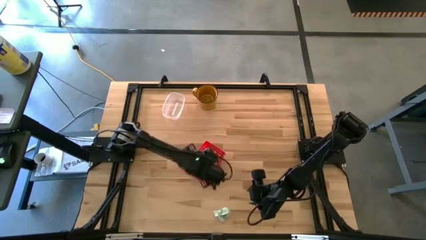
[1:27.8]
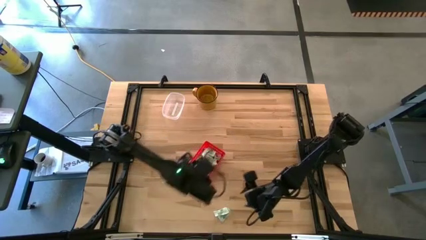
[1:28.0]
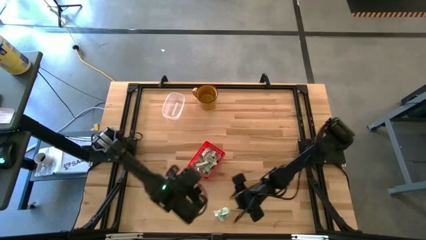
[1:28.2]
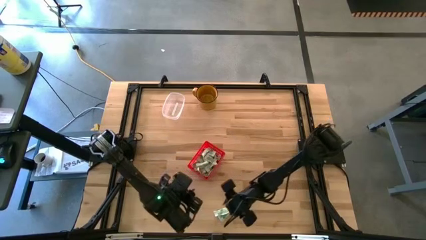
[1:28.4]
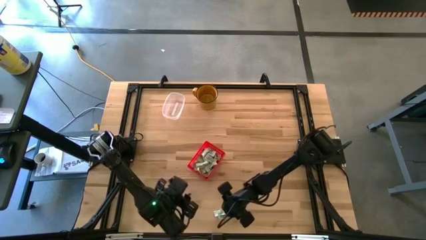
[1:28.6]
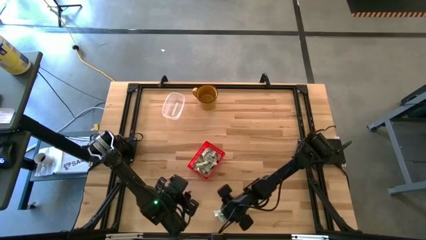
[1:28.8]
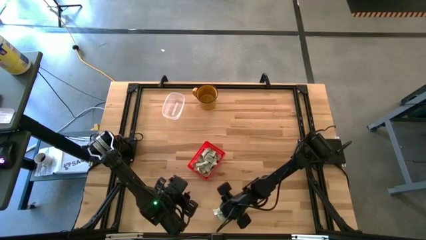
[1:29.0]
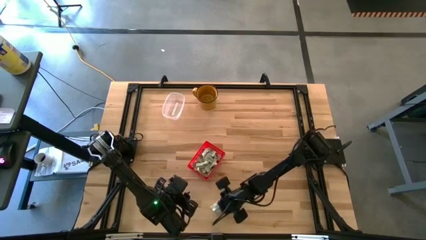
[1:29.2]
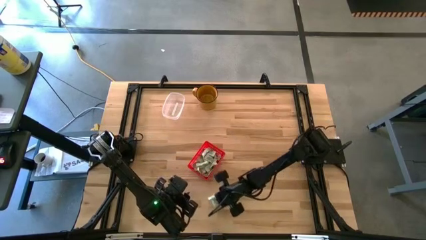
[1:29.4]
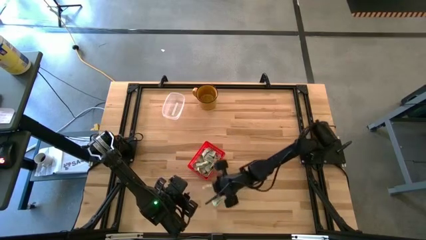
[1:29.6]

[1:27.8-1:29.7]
Task: Pick and place Stevia / Truvia into bins
Put the white stevia packet into the red basket

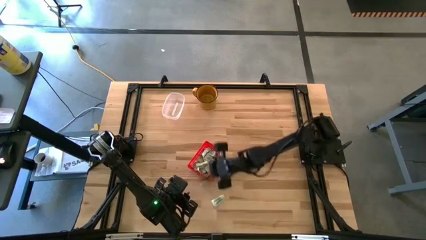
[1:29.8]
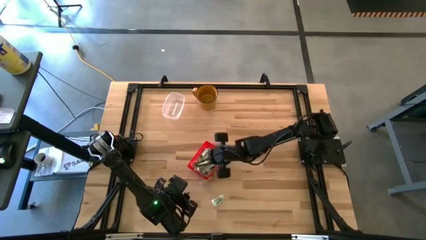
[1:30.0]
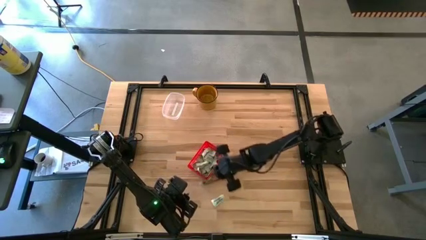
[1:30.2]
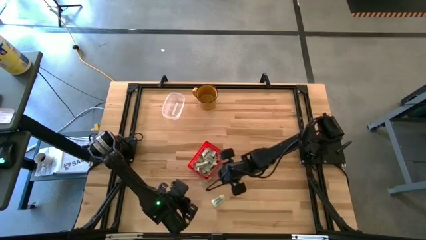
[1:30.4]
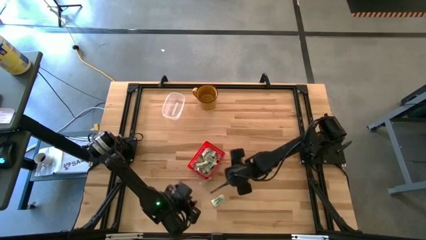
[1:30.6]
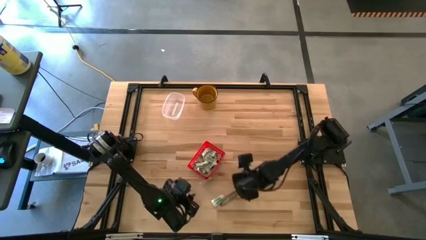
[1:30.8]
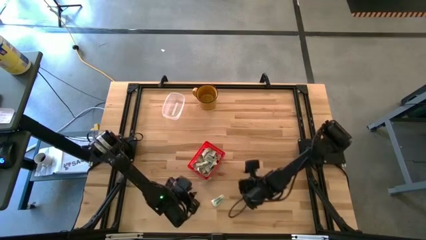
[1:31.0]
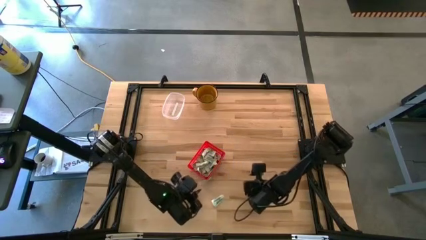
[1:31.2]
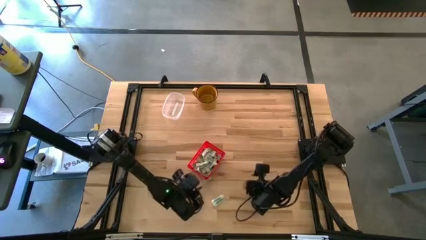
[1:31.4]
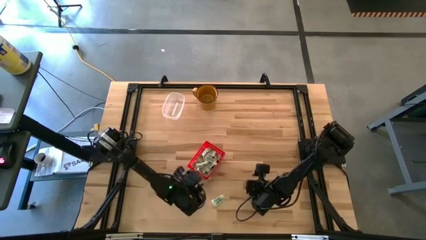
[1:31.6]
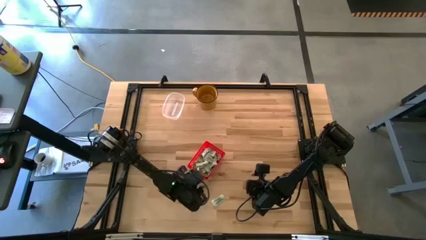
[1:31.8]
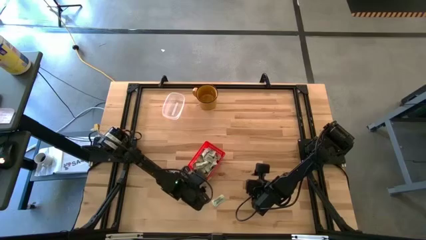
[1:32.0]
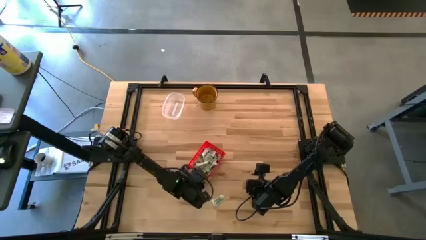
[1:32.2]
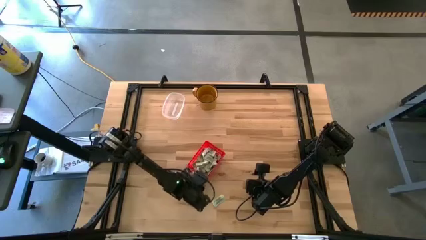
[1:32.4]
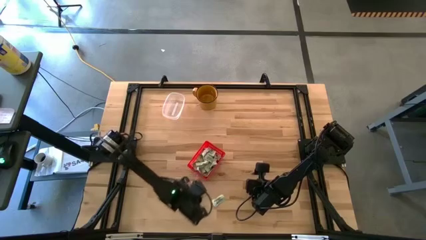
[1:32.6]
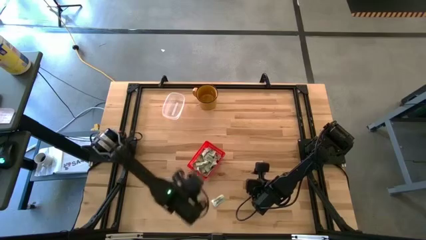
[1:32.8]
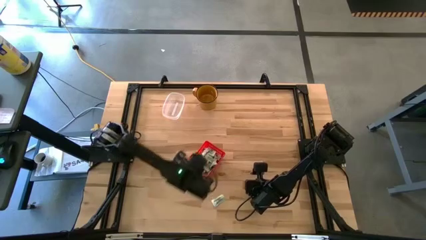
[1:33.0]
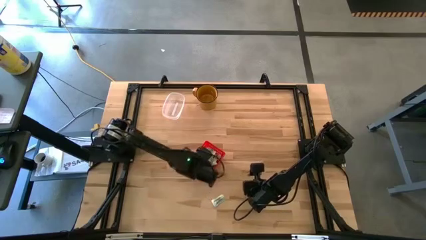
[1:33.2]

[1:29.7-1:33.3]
Put the white stevia packet into the red basket

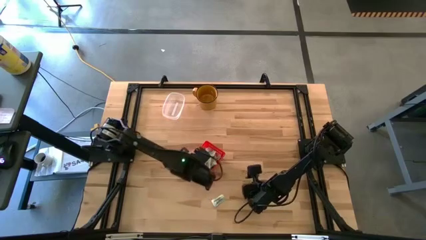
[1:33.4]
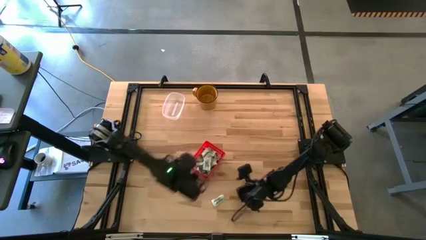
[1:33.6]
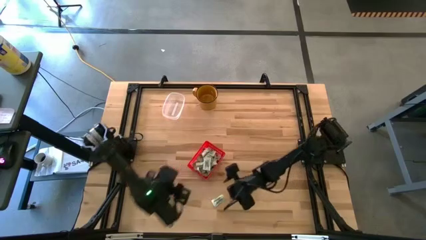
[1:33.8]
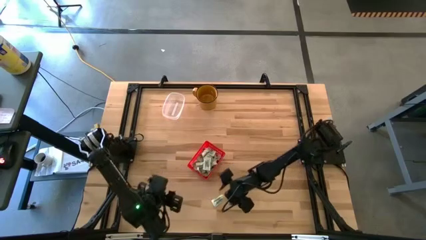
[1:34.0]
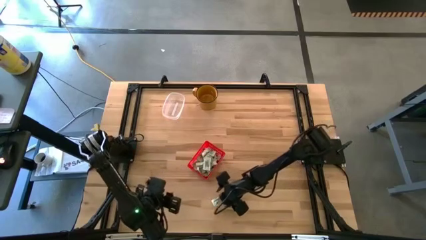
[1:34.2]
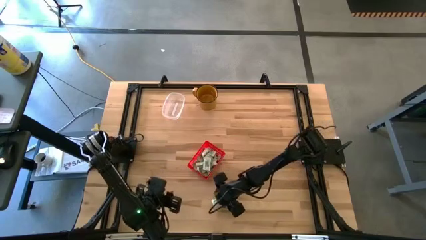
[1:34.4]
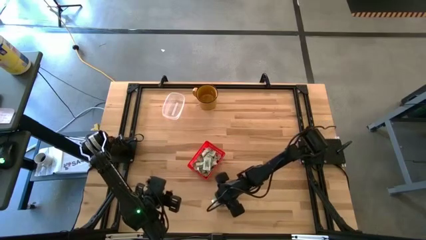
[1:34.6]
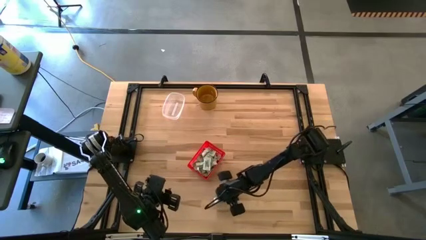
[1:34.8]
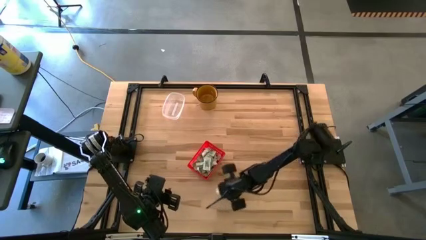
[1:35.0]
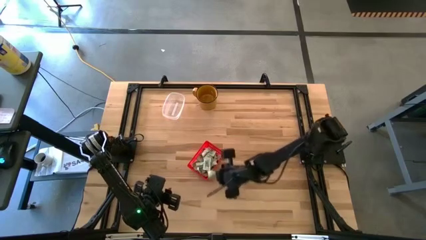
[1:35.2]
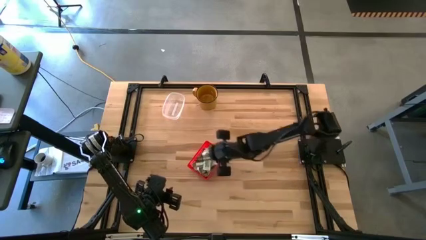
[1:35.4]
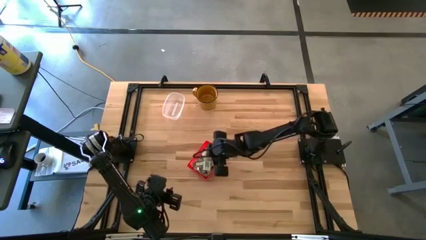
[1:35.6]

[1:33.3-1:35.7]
Put the white stevia packet into the red basket

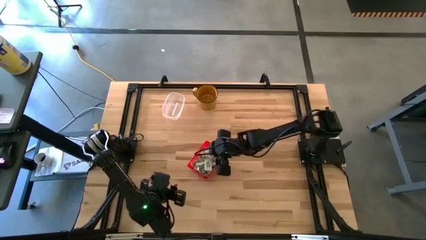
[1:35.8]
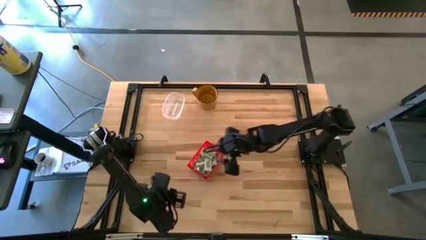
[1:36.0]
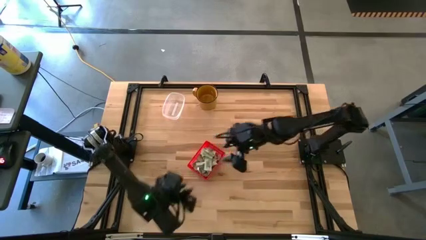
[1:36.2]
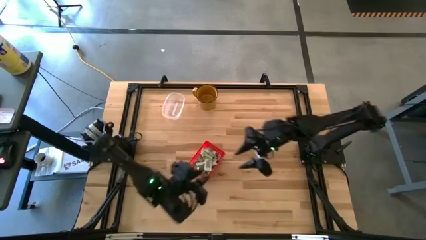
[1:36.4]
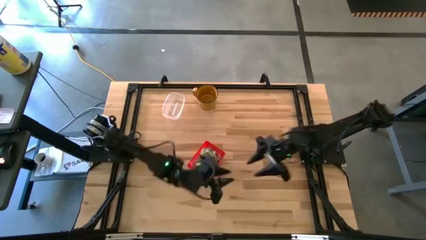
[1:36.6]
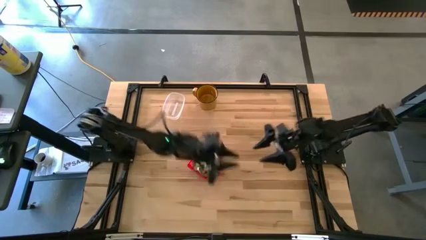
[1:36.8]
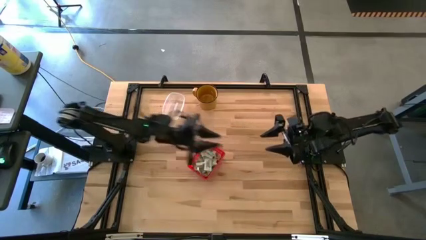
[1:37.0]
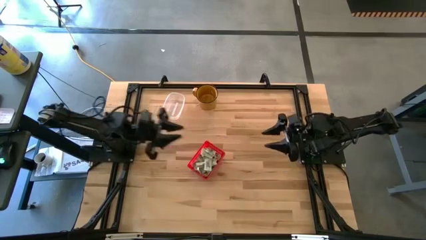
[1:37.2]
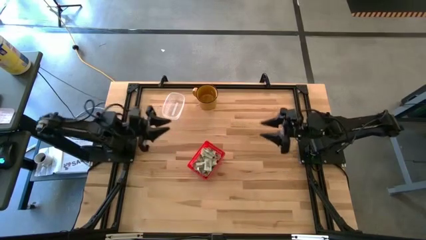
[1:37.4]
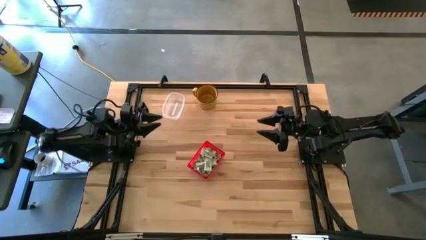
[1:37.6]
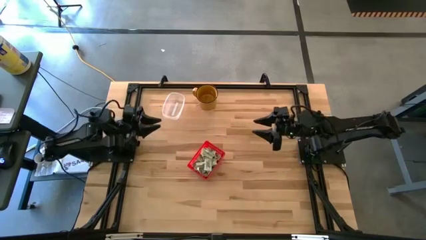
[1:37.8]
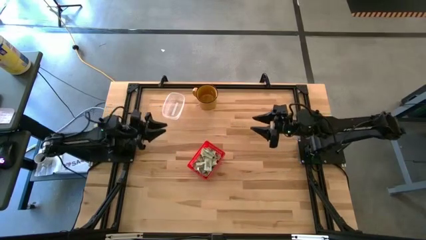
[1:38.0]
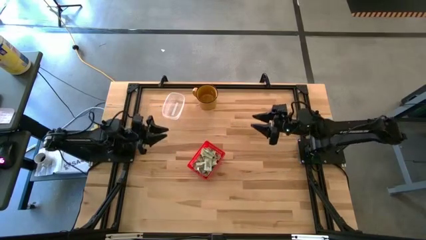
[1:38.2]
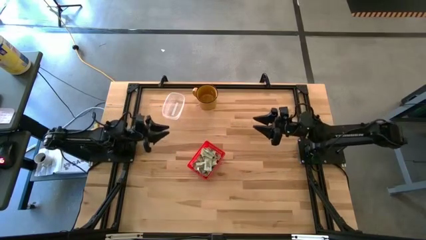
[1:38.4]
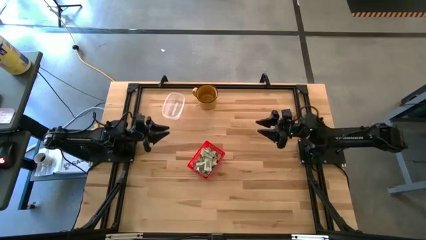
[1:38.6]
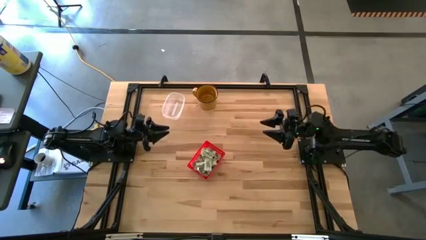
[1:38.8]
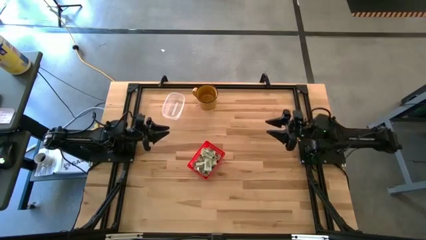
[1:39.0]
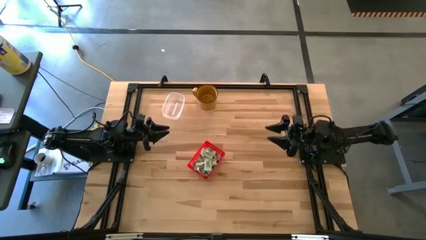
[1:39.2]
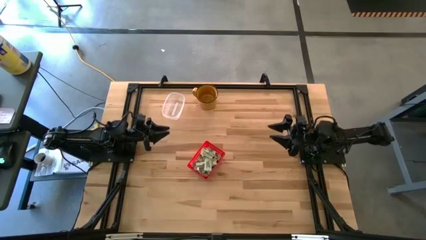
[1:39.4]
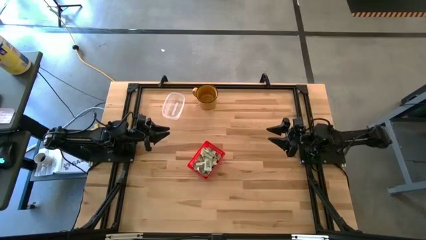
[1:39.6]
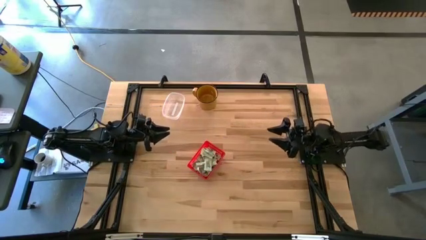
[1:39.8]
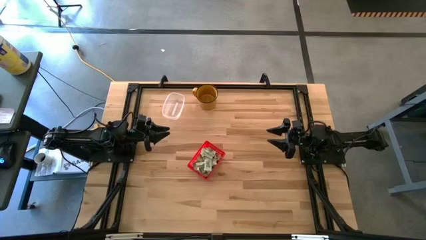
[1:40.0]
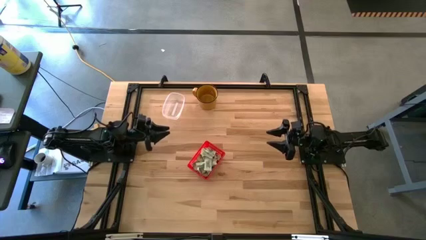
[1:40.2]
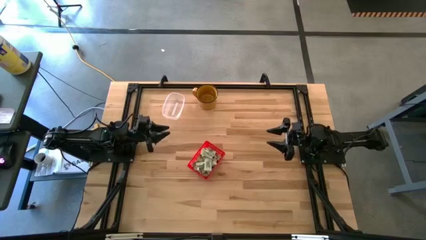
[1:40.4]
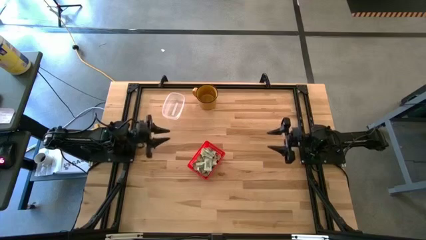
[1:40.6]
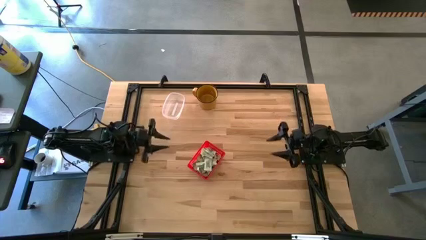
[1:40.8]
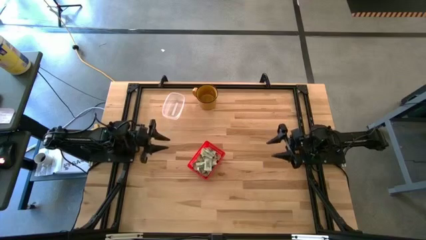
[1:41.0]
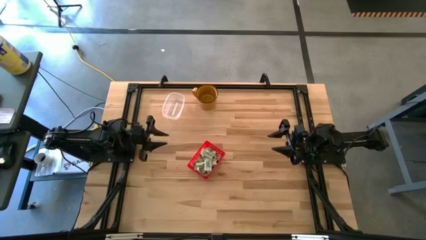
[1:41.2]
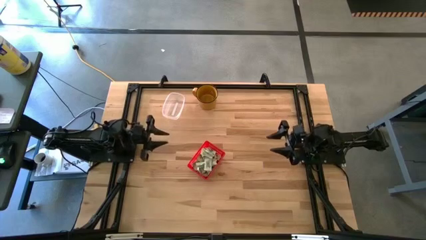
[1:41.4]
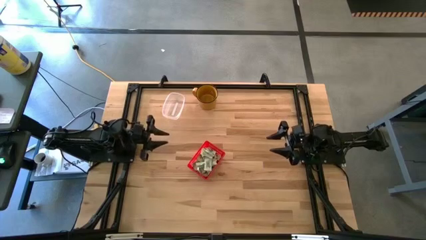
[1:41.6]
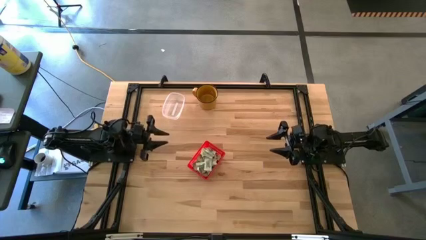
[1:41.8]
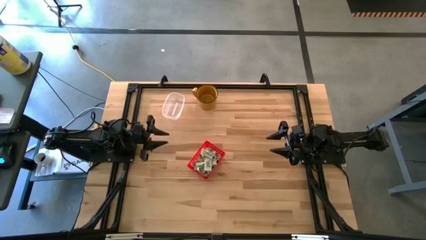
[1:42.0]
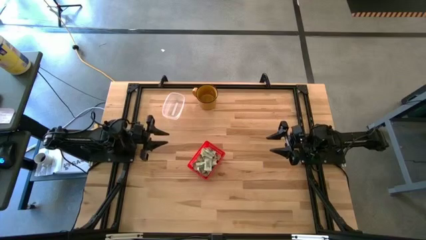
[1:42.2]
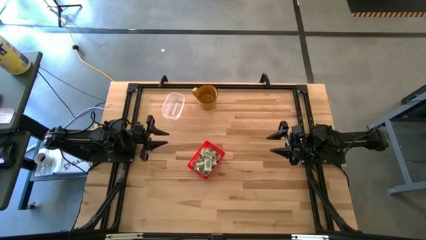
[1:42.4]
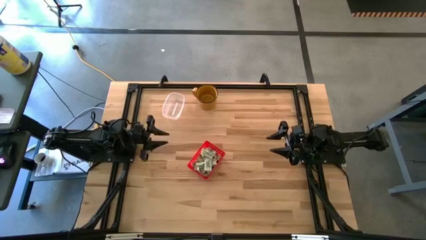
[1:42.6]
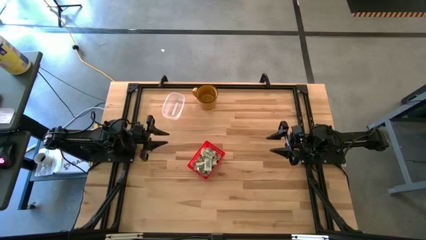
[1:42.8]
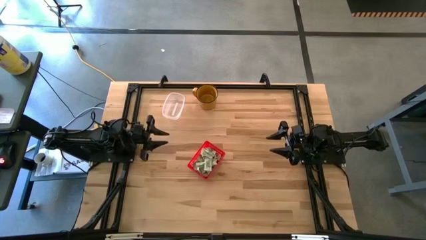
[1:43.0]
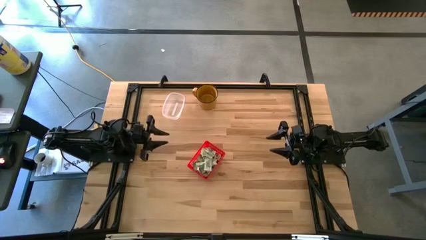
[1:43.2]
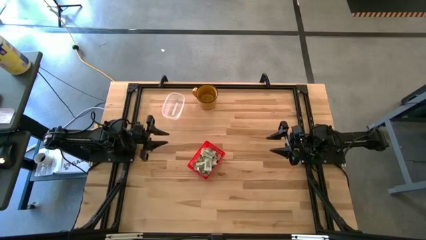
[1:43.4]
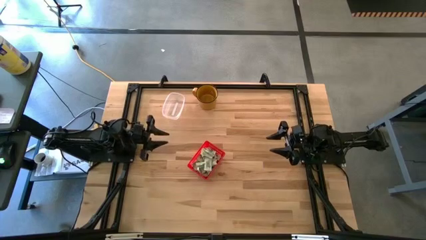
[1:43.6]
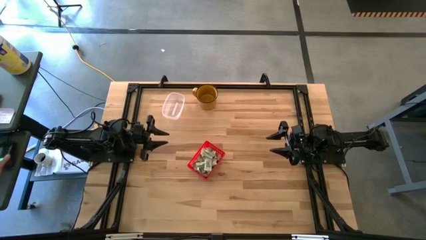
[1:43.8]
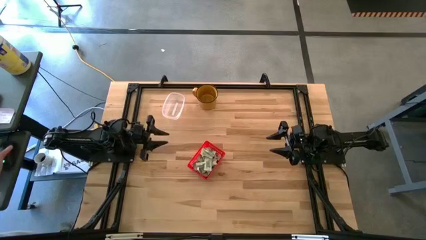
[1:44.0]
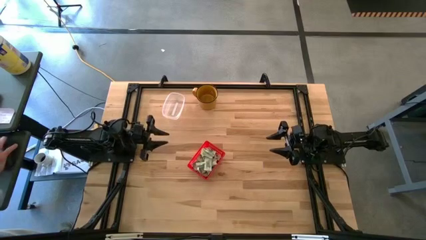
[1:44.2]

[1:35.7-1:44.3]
Return to Home Position
